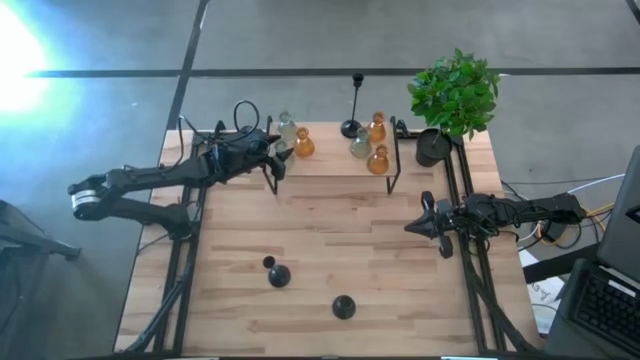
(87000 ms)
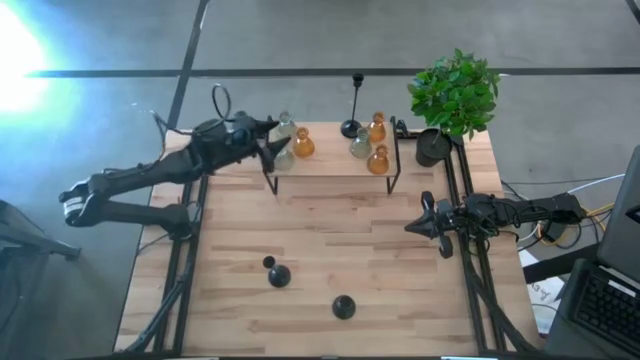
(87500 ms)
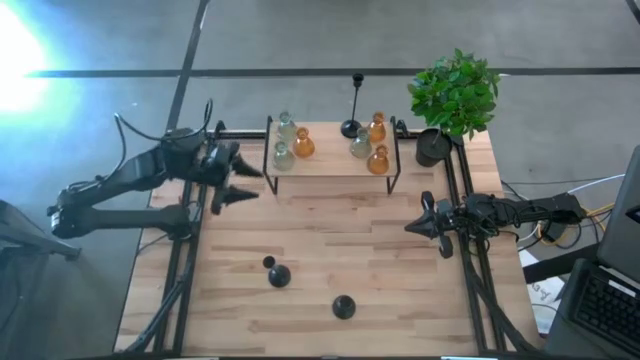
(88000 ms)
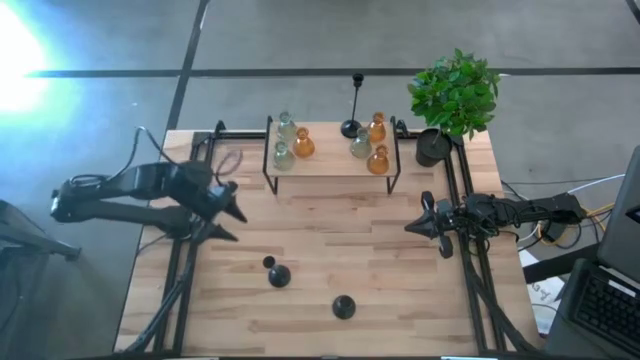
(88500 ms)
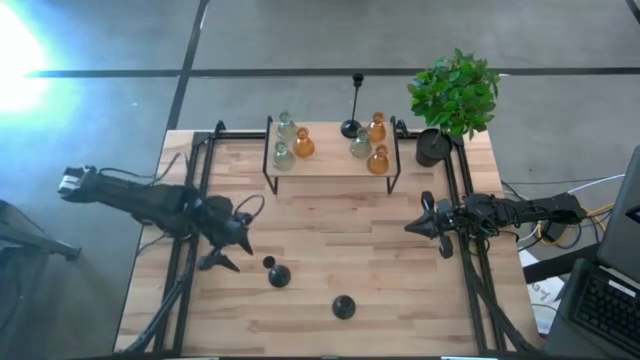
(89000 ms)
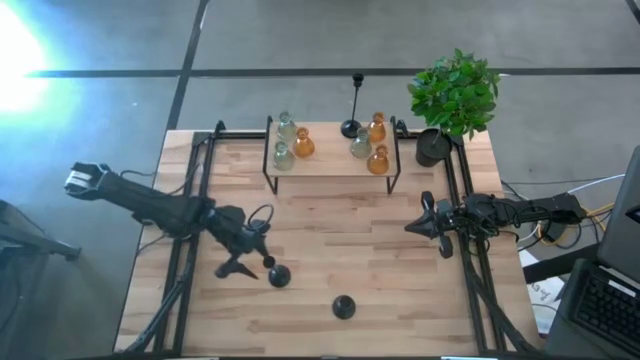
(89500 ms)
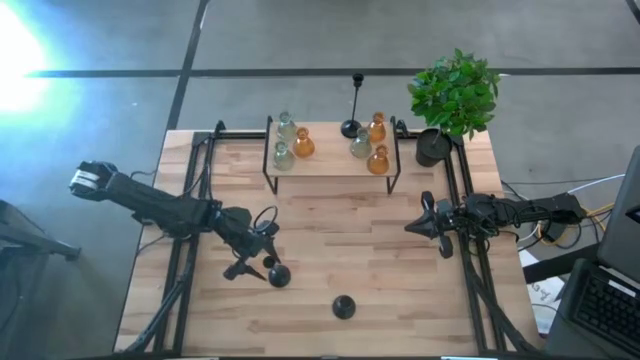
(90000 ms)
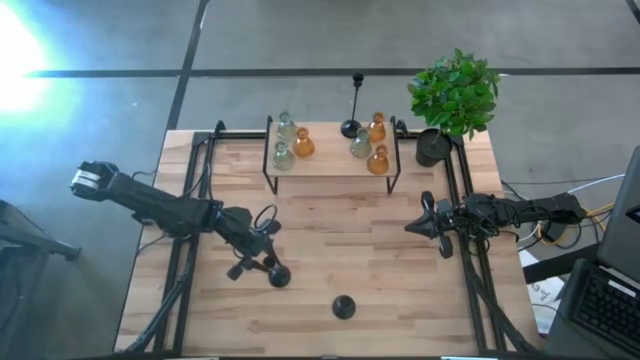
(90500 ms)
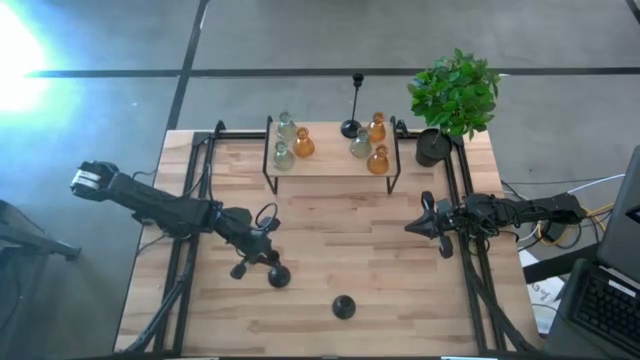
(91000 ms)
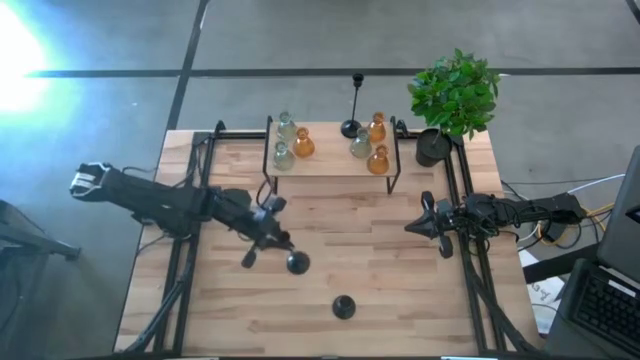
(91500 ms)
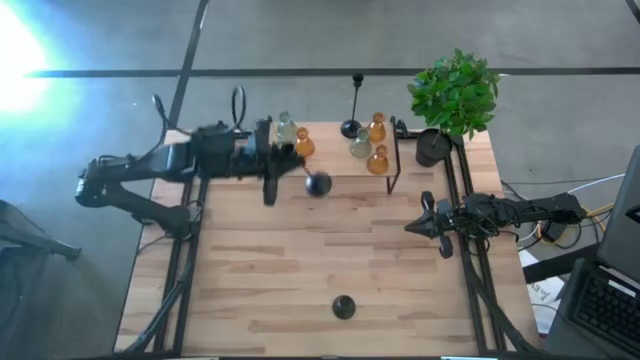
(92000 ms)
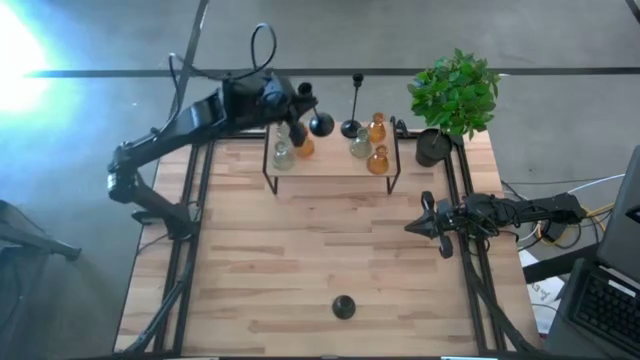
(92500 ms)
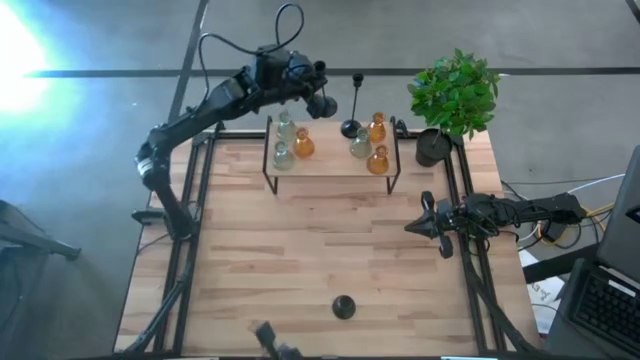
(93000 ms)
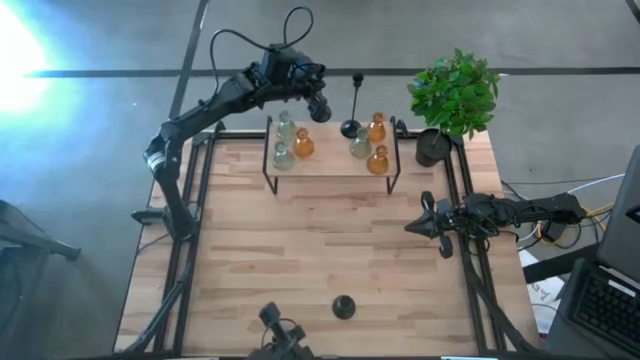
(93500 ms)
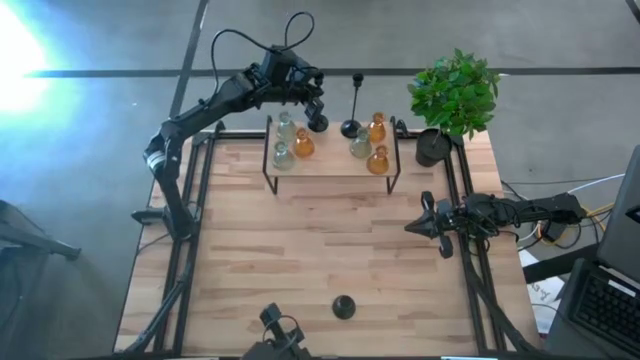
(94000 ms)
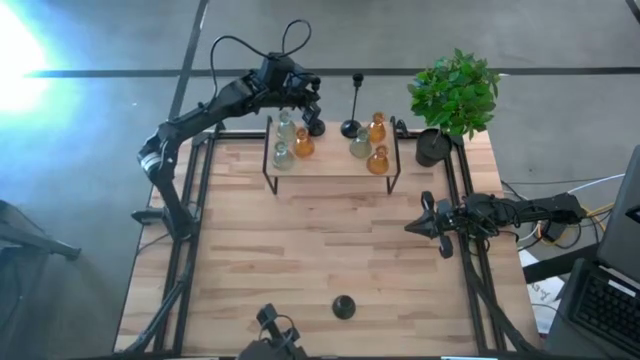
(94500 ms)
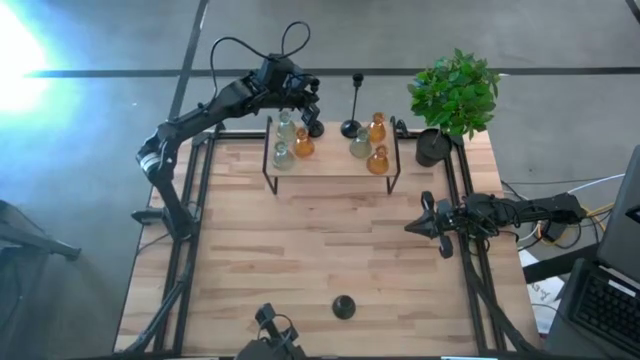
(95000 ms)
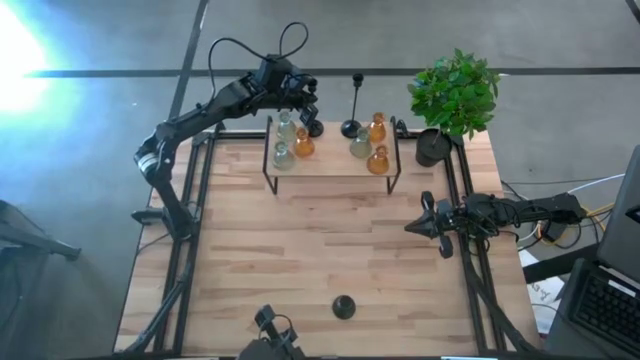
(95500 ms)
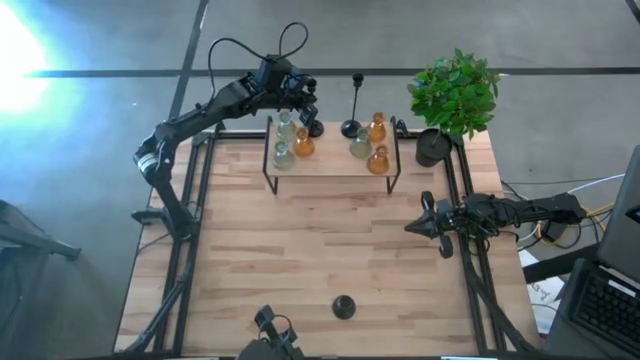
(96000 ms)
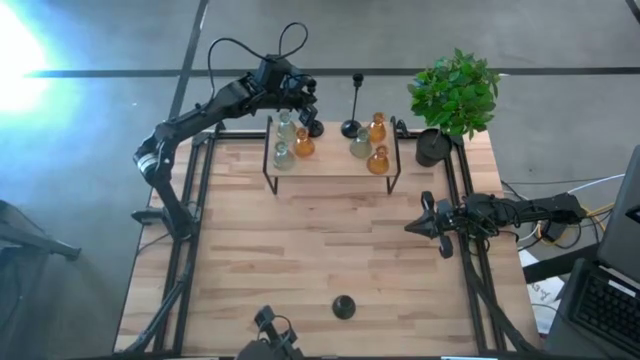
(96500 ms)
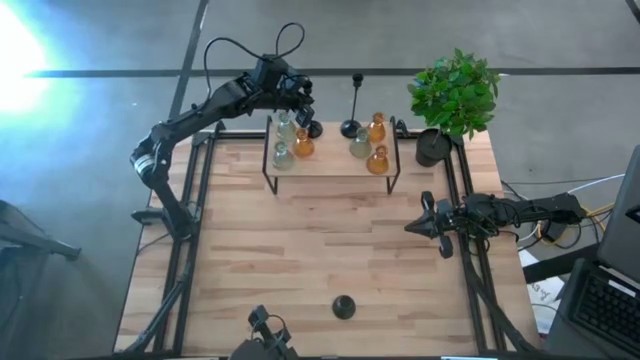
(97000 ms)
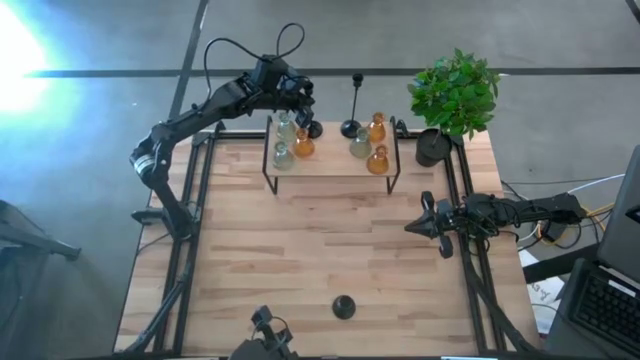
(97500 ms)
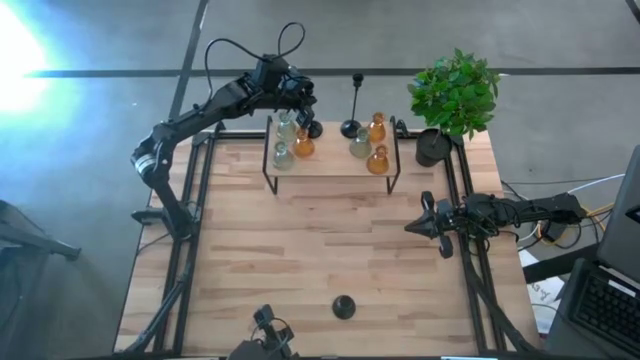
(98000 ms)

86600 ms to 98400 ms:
Task: Pick & Place candle stick holders
Put the left black candle holder on the shelf
